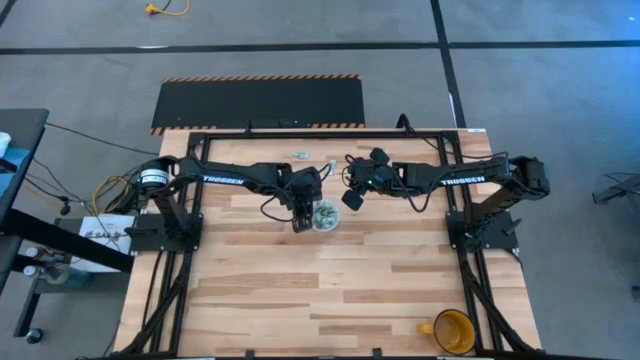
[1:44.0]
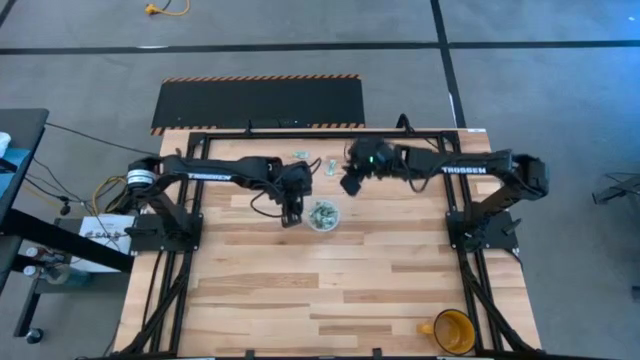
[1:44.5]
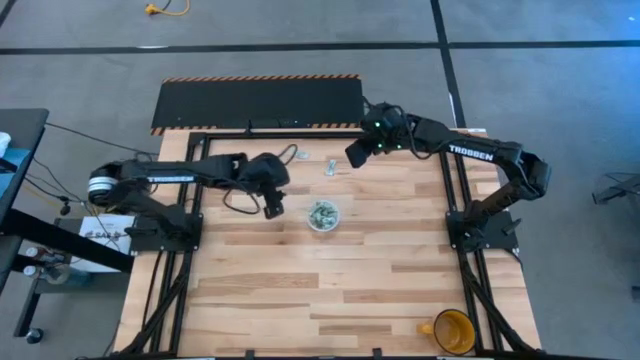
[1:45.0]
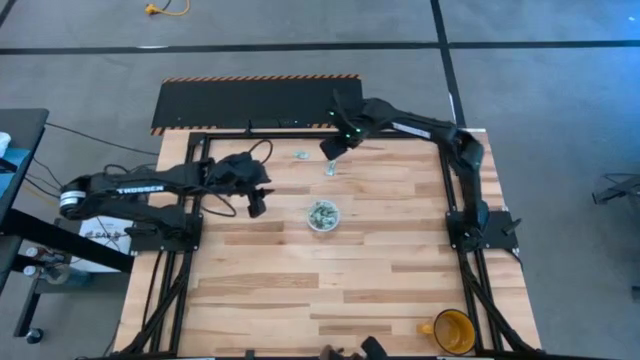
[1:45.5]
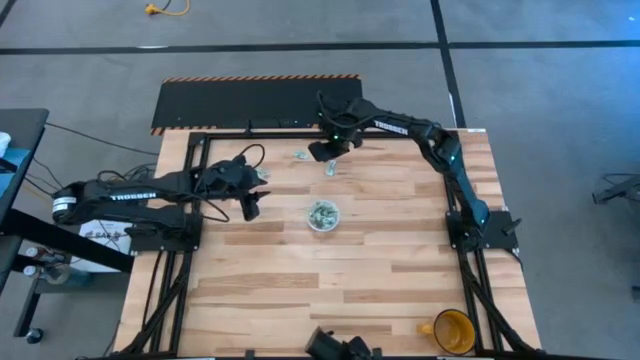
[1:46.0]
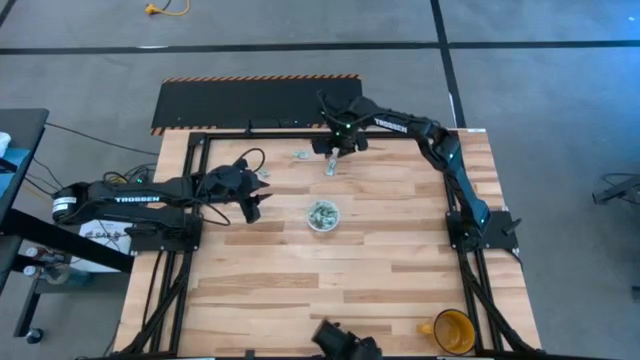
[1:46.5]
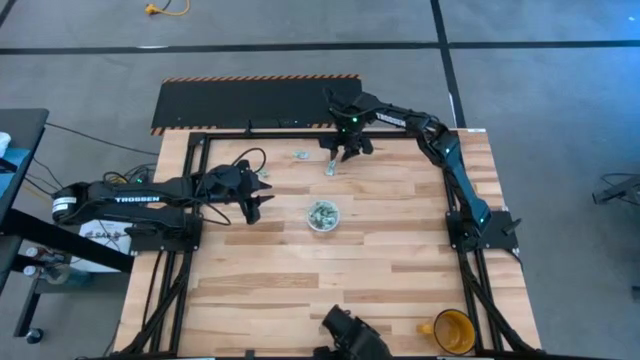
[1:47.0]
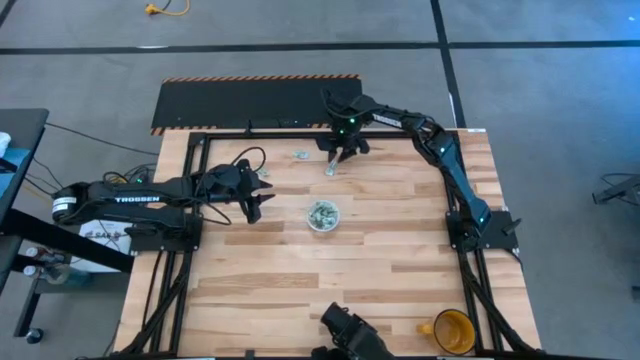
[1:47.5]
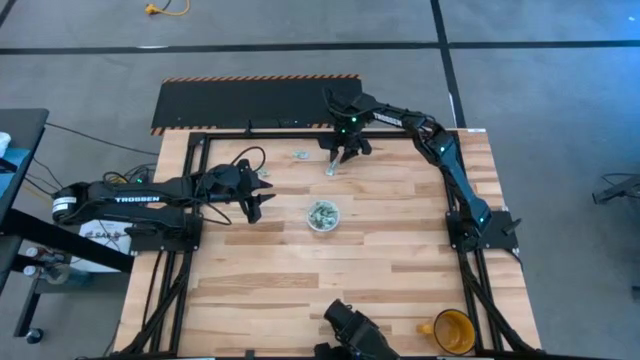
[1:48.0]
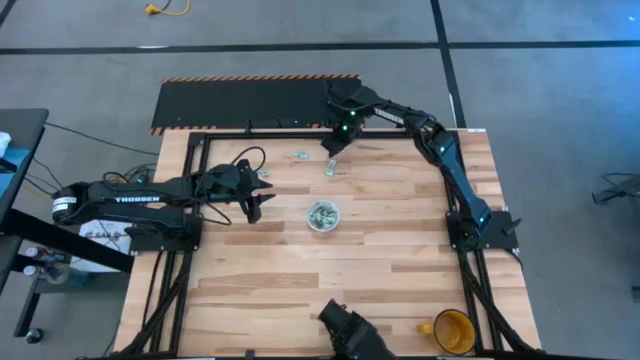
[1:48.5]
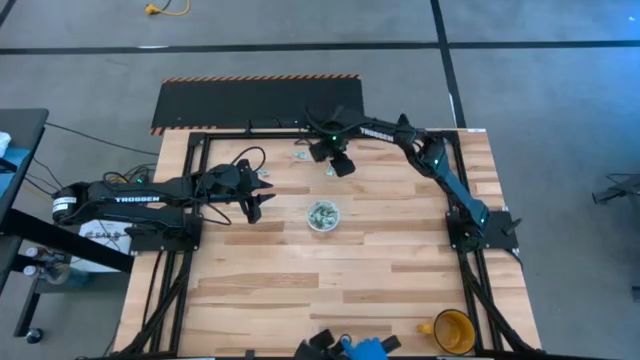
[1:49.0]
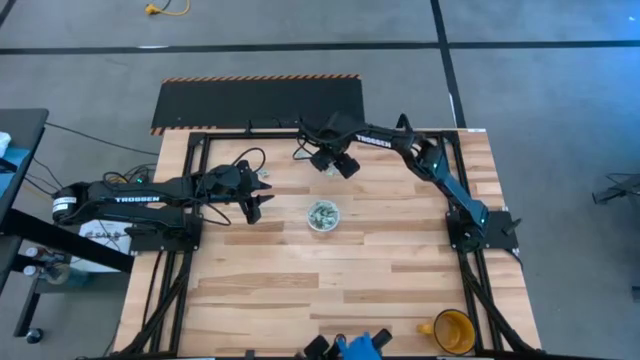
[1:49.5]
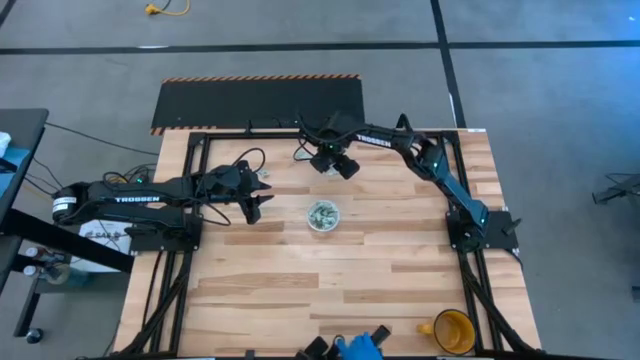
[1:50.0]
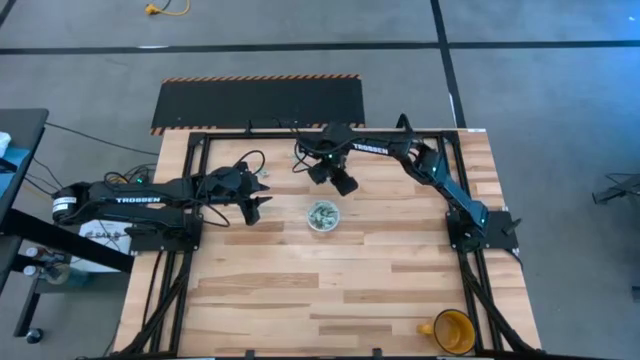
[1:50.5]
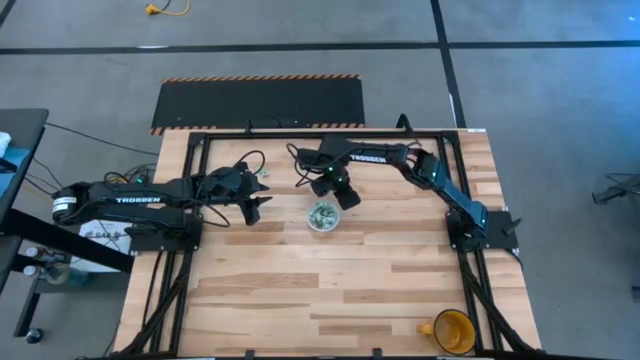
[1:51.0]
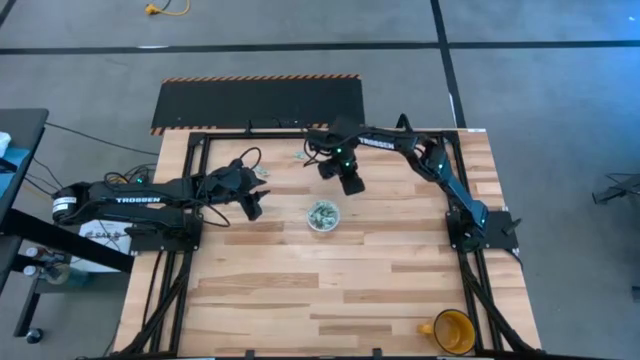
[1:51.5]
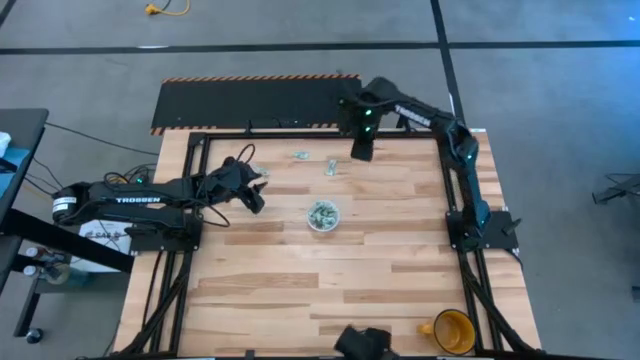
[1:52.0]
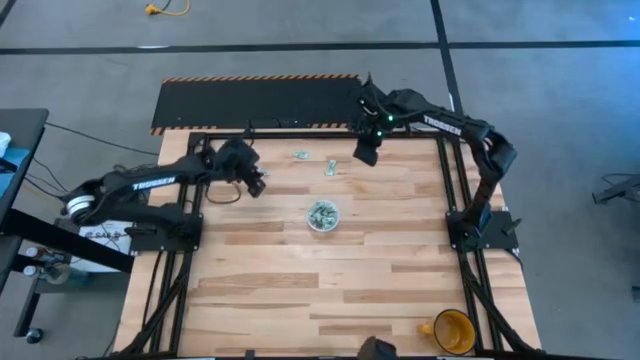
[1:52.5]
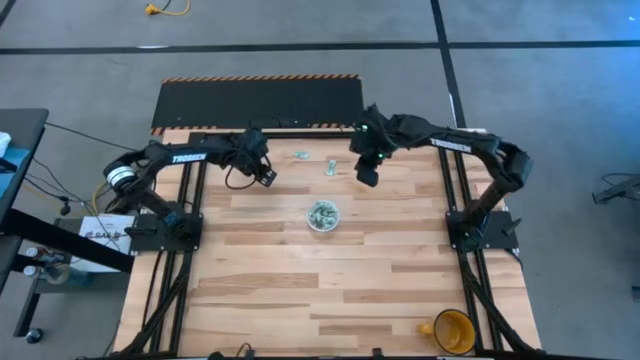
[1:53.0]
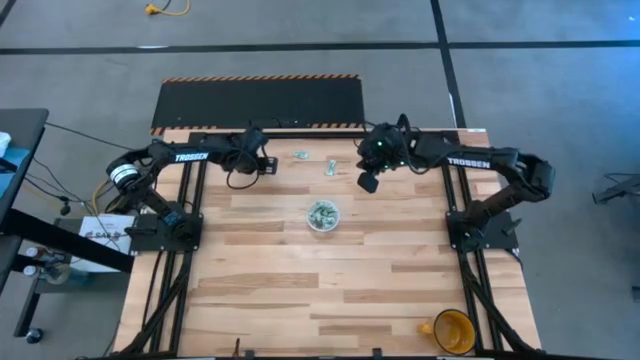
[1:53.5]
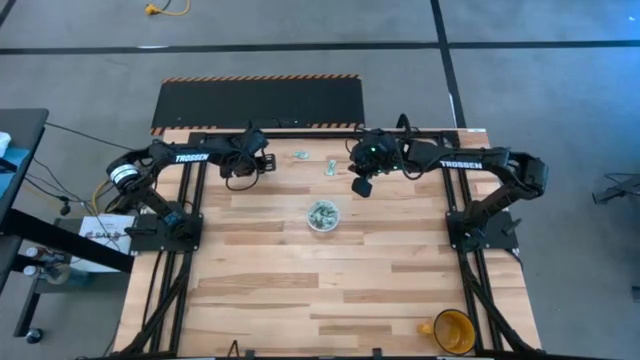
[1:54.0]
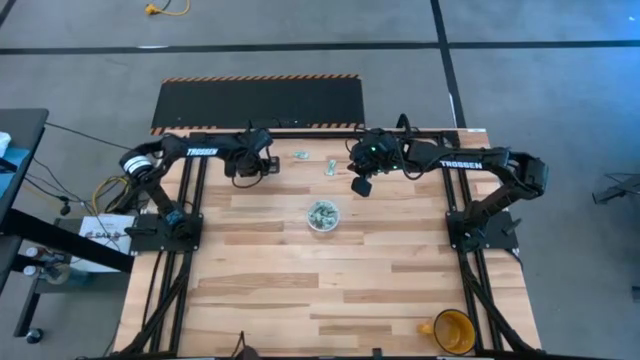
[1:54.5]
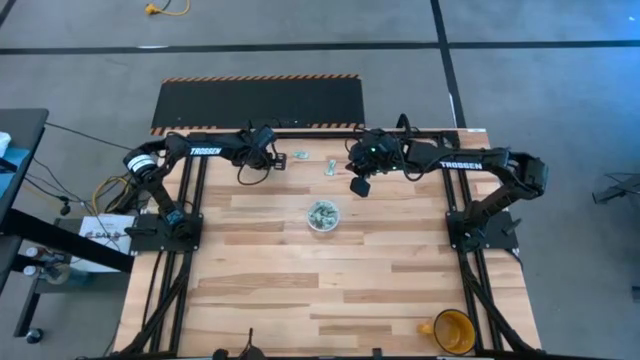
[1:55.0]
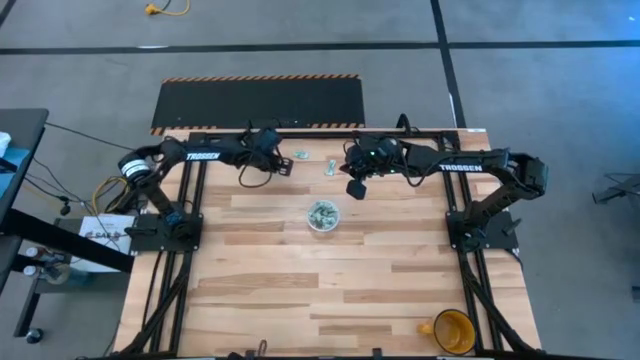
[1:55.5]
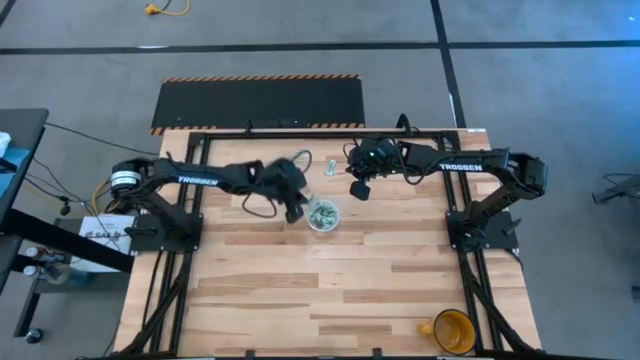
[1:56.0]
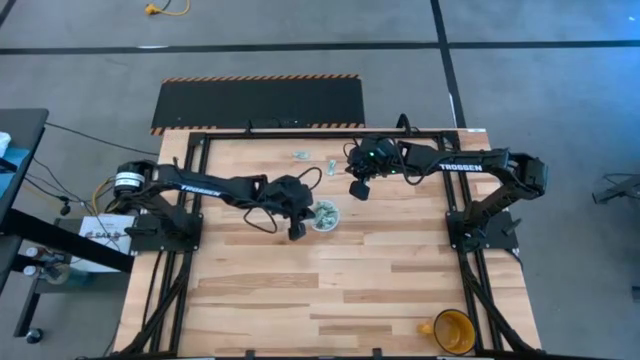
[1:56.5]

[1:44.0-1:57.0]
Task: Pick and place Stevia / Truvia into bins
Put the green stevia packet into the transparent container

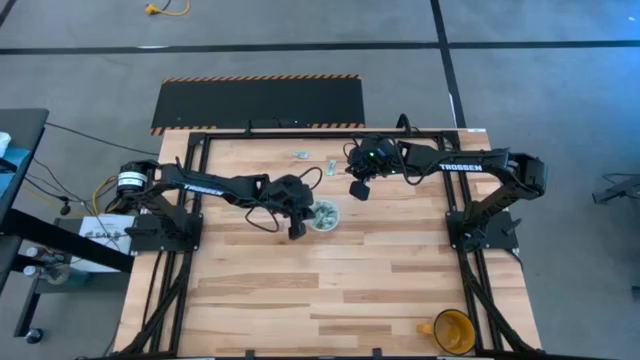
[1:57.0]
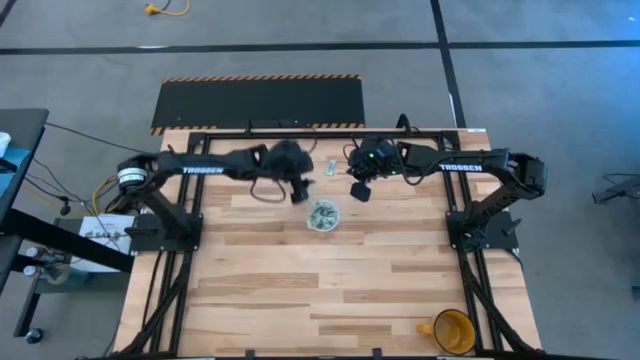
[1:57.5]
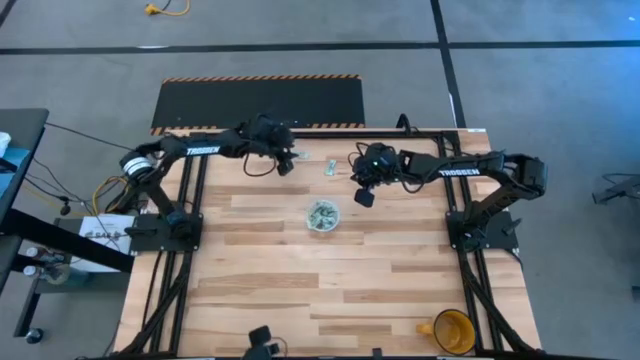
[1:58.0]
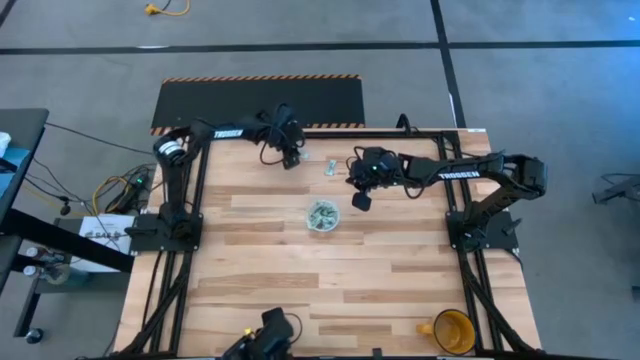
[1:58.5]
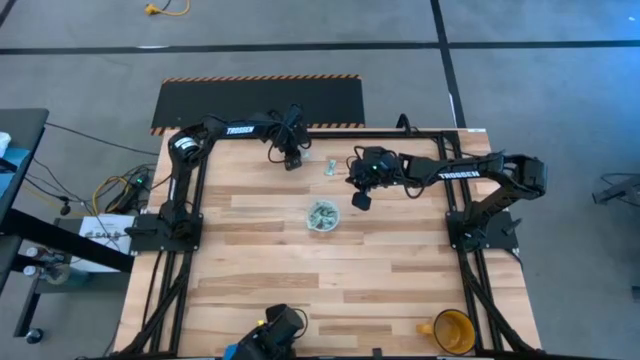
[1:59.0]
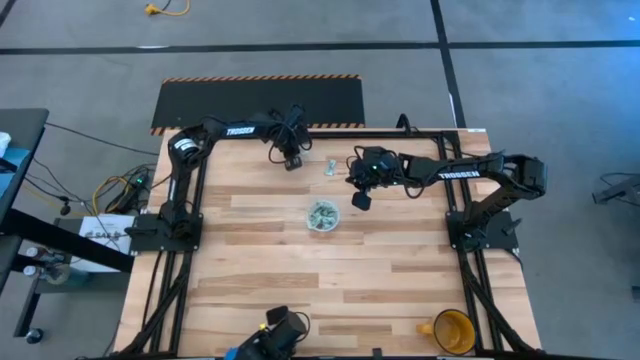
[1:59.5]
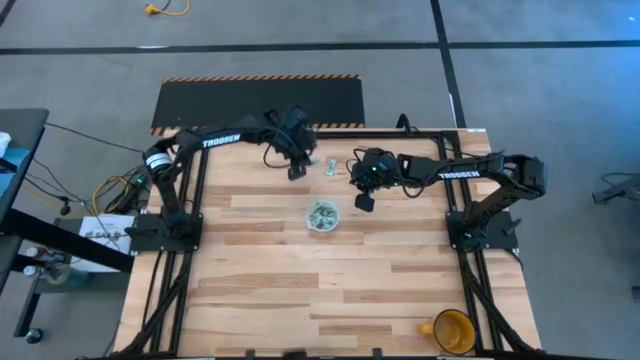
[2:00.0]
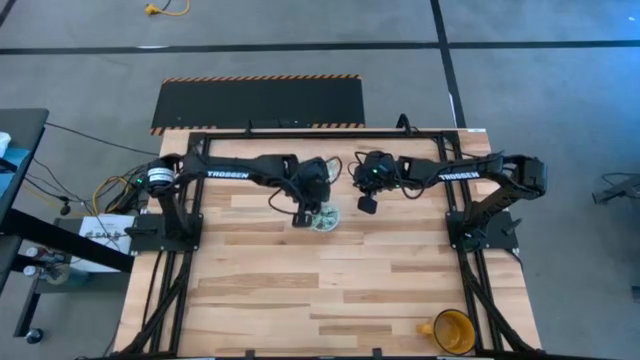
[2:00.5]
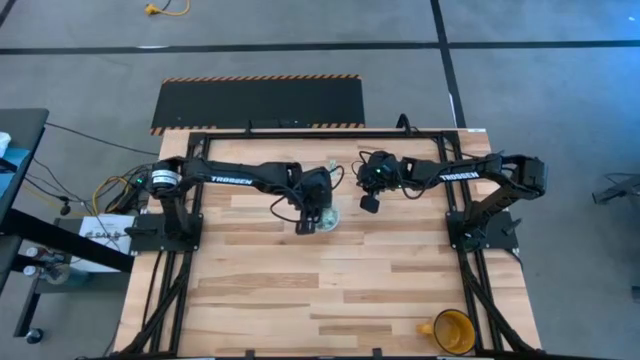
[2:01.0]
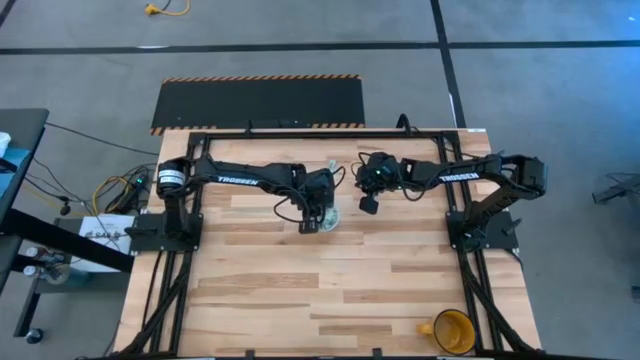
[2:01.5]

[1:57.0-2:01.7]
Put the green stevia packet into the transparent container

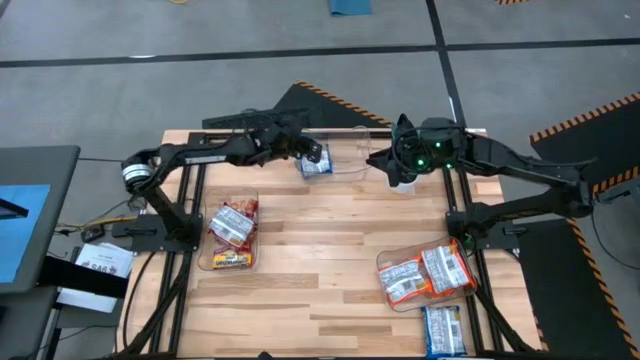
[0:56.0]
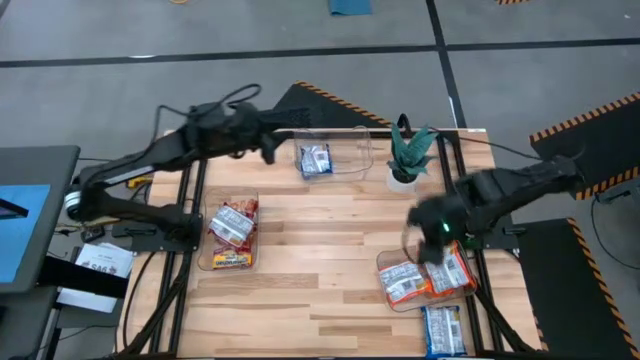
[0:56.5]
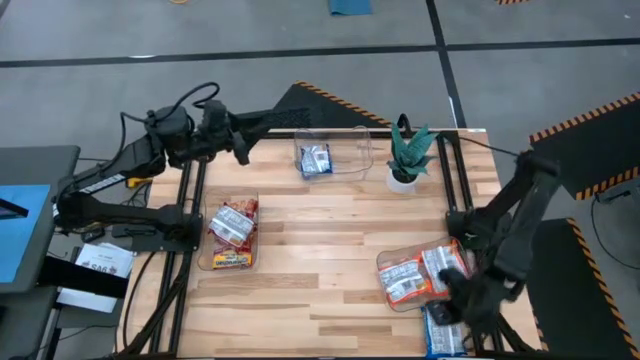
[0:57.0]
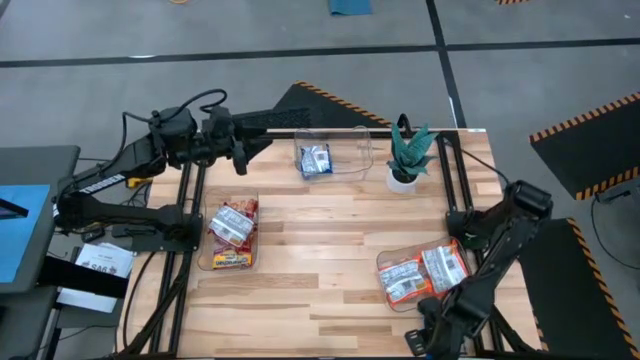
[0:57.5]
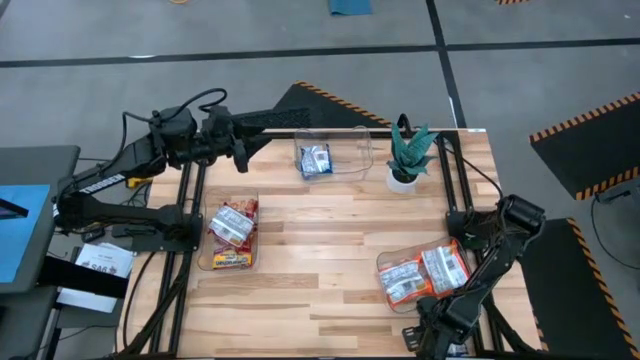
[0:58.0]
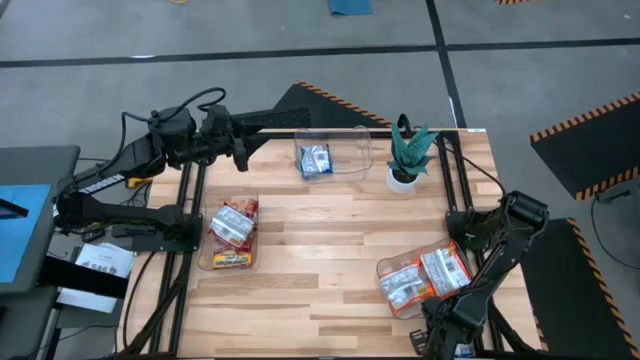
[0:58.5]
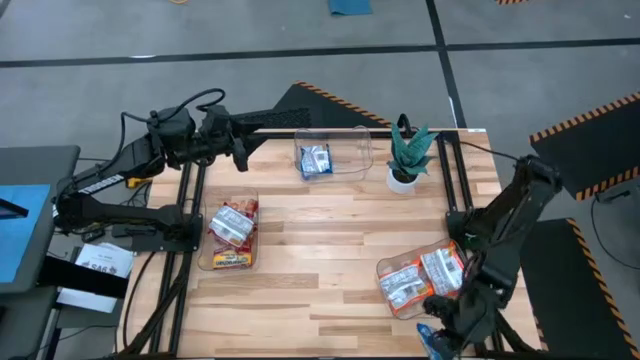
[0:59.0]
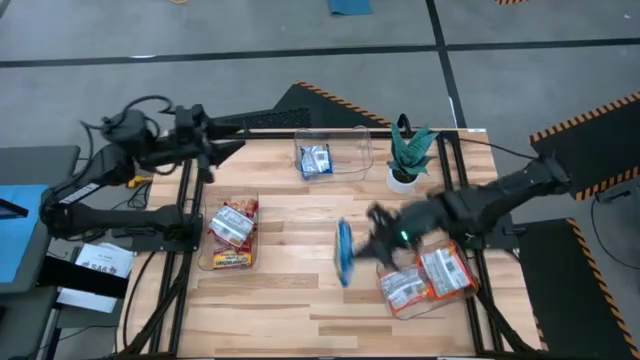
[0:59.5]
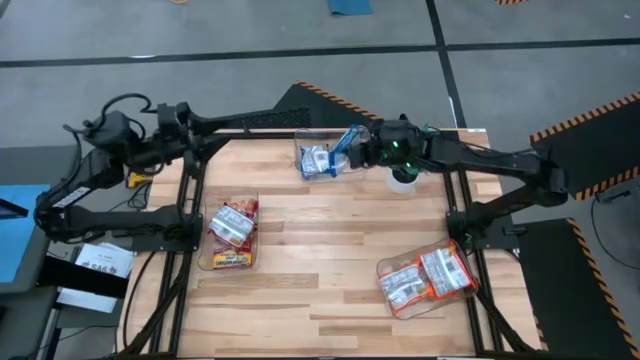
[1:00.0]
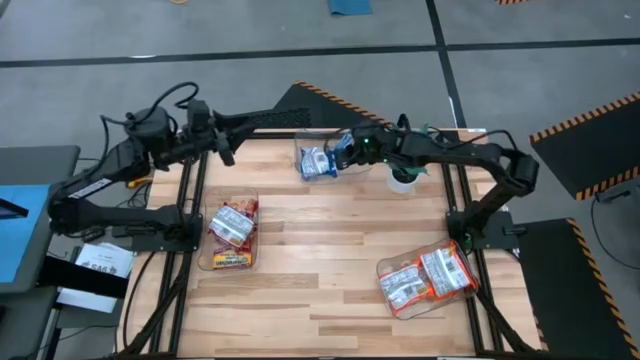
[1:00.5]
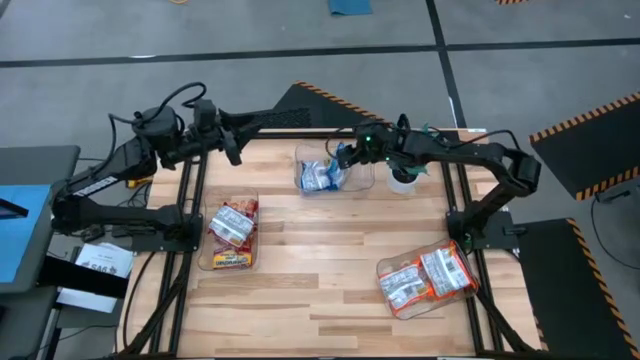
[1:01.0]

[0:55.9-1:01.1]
Task: Sort Maruchan noodles
Put the blue noodle pack into the top transparent bin
